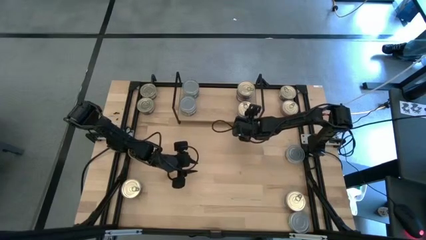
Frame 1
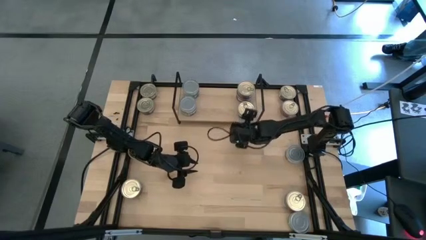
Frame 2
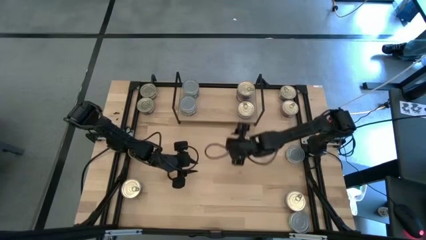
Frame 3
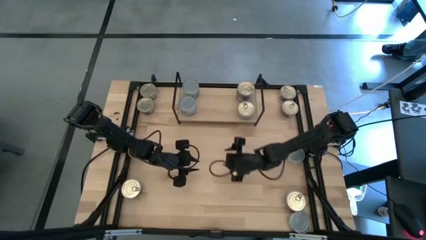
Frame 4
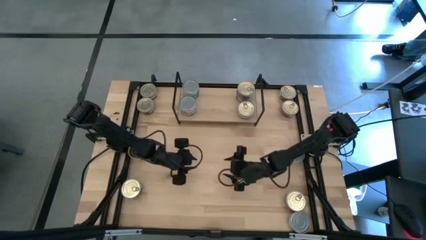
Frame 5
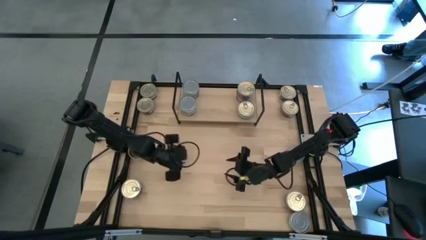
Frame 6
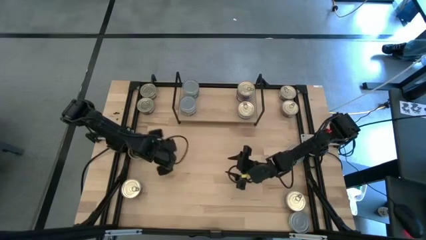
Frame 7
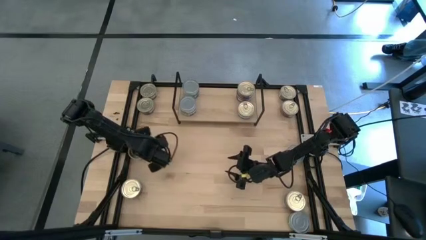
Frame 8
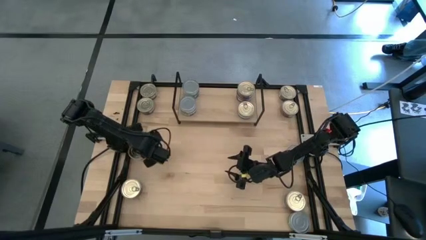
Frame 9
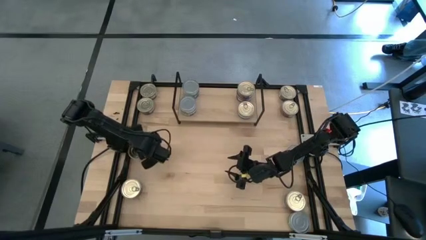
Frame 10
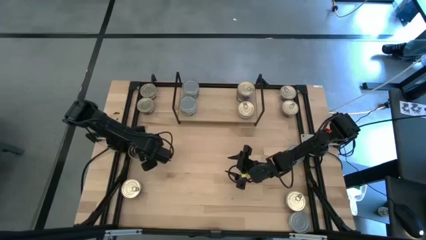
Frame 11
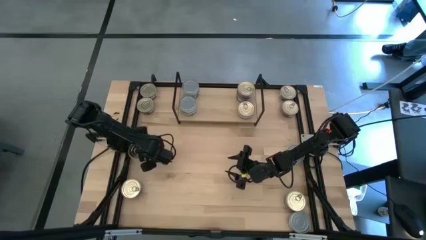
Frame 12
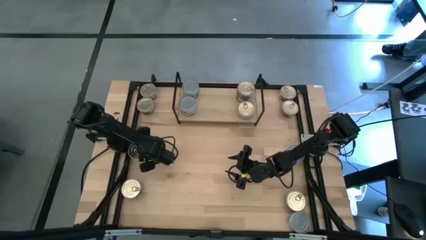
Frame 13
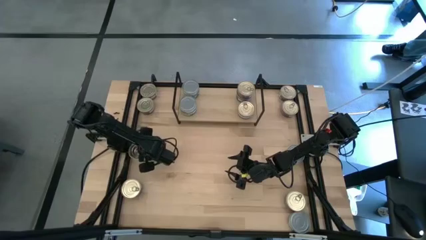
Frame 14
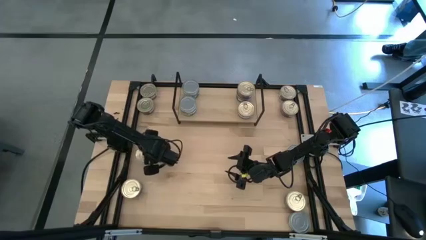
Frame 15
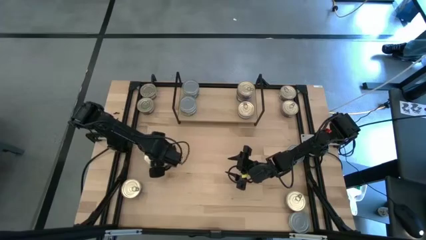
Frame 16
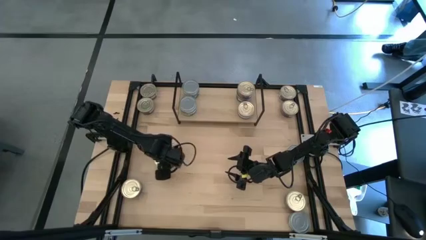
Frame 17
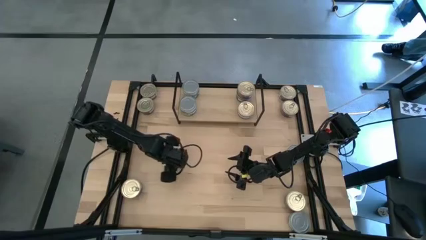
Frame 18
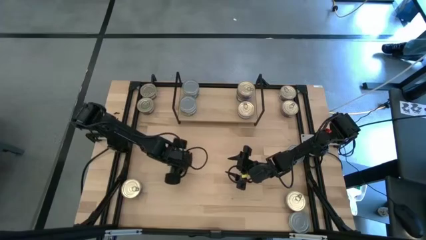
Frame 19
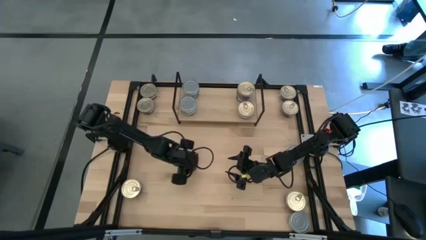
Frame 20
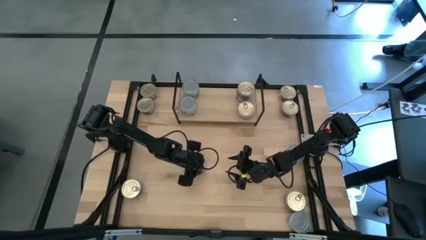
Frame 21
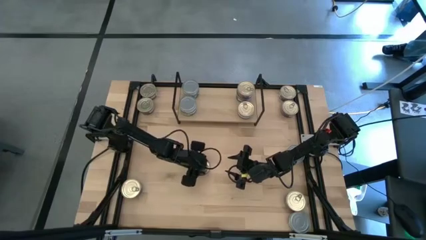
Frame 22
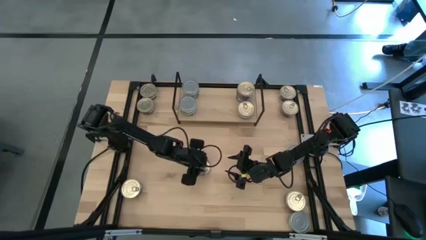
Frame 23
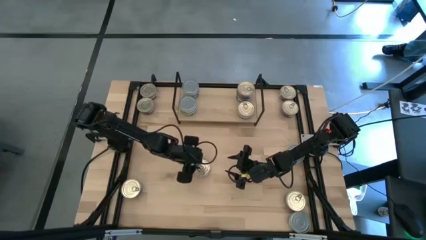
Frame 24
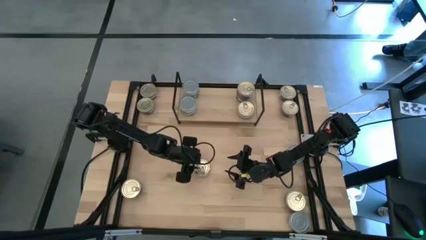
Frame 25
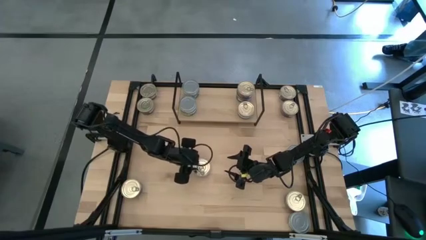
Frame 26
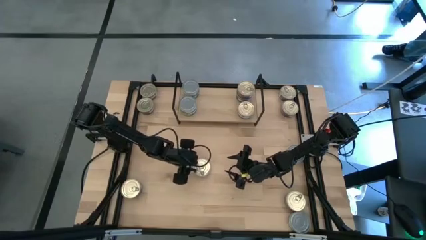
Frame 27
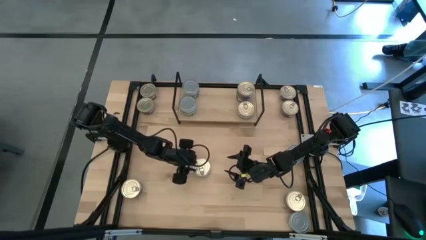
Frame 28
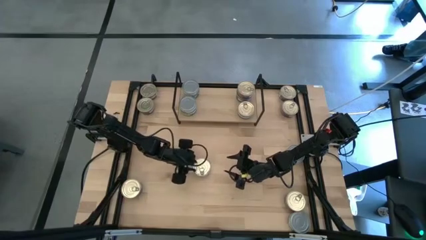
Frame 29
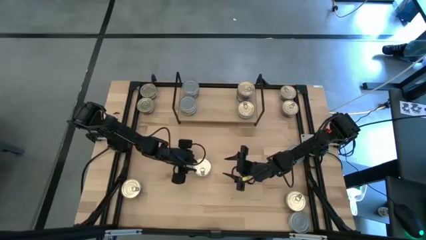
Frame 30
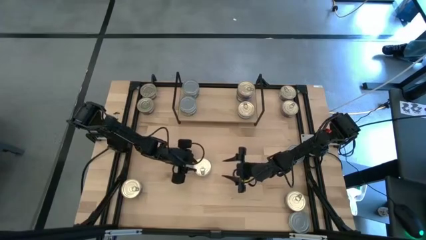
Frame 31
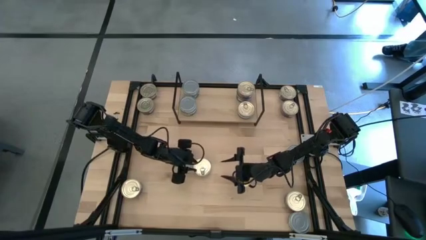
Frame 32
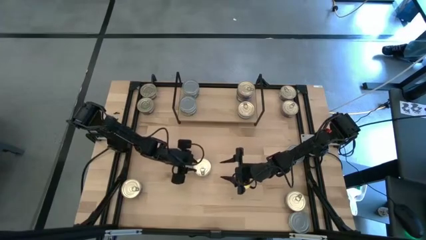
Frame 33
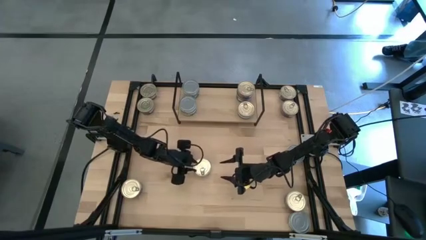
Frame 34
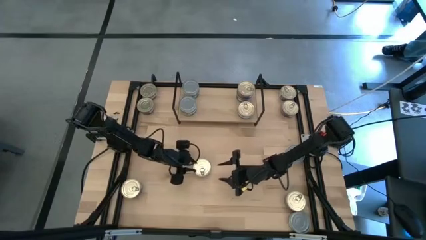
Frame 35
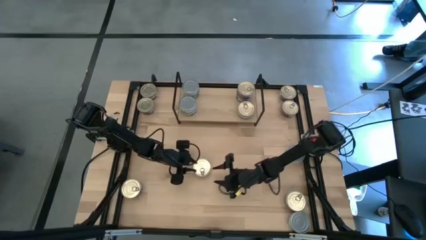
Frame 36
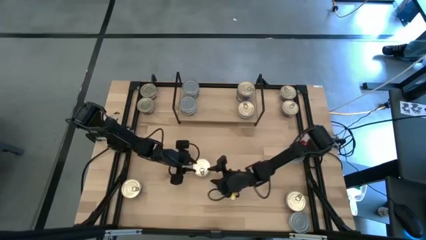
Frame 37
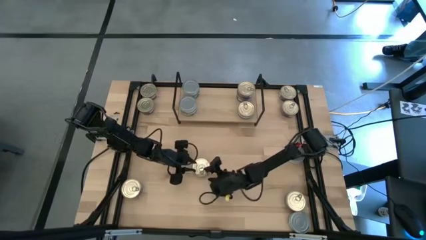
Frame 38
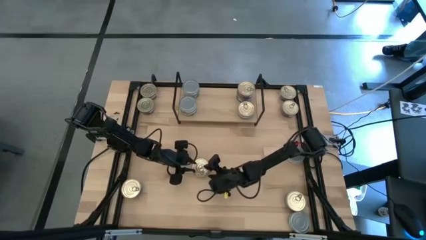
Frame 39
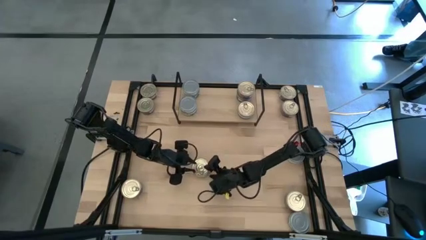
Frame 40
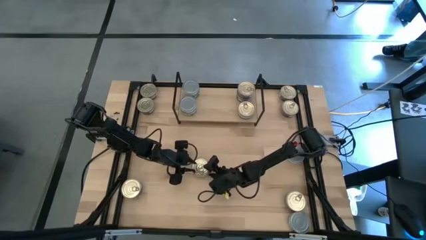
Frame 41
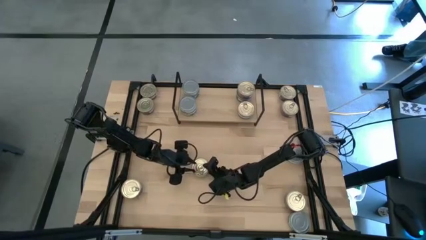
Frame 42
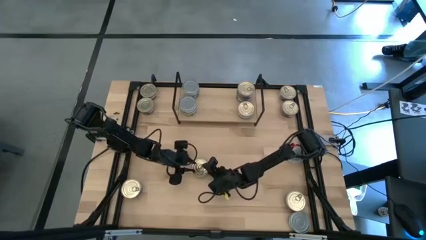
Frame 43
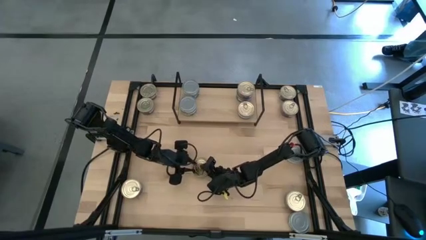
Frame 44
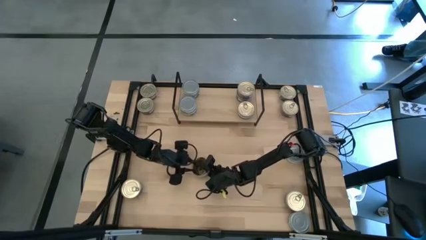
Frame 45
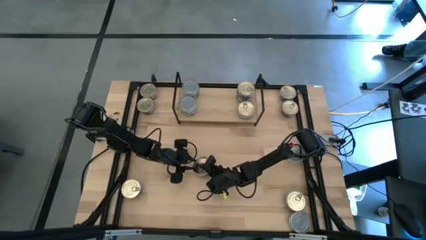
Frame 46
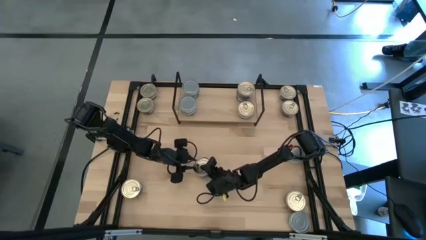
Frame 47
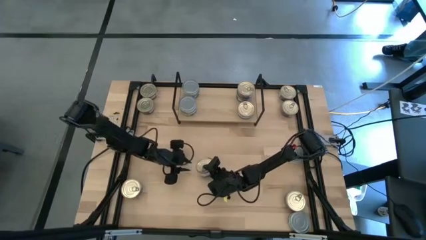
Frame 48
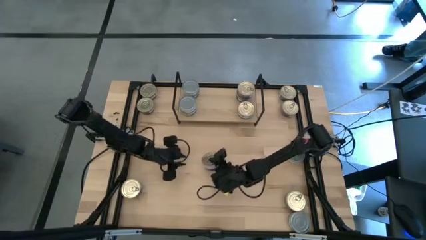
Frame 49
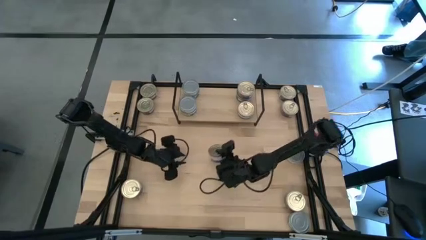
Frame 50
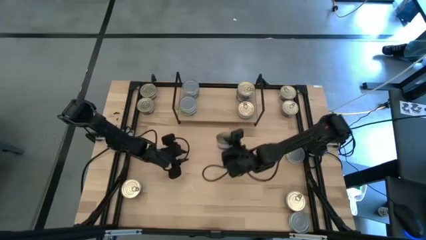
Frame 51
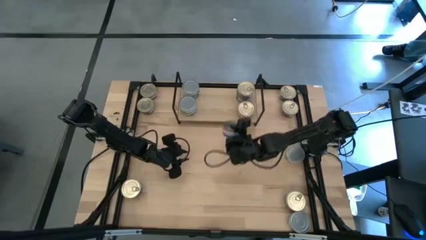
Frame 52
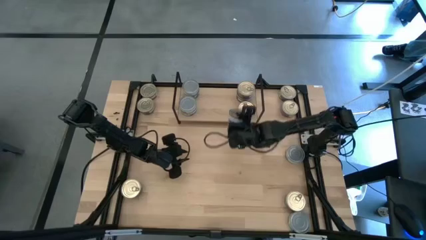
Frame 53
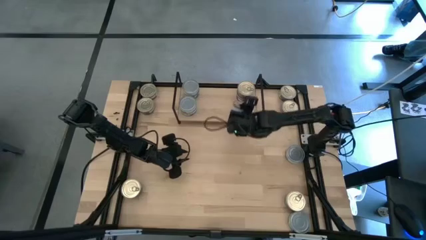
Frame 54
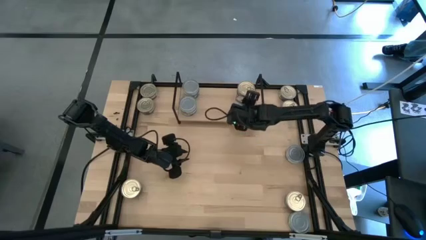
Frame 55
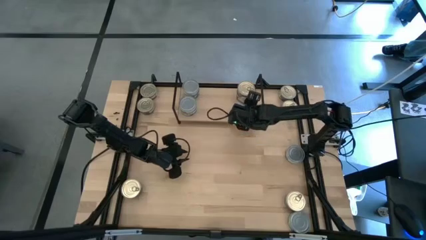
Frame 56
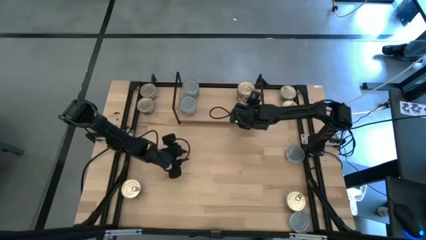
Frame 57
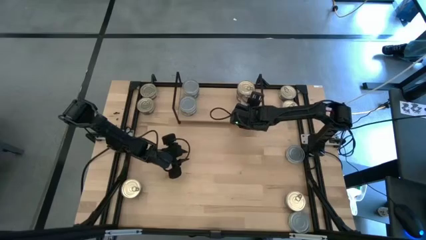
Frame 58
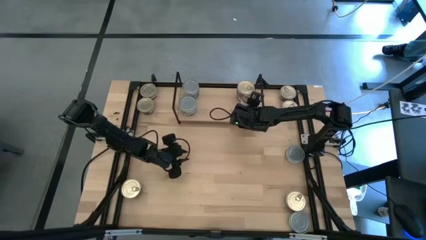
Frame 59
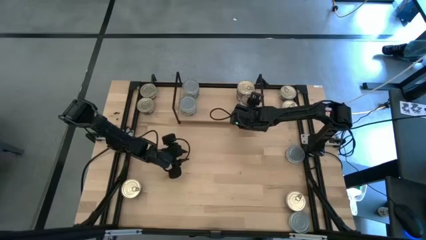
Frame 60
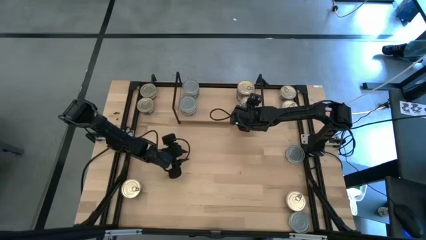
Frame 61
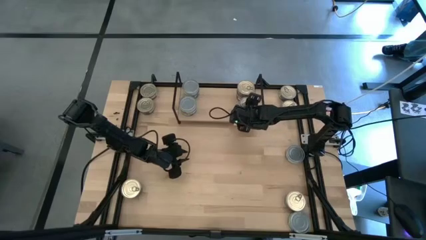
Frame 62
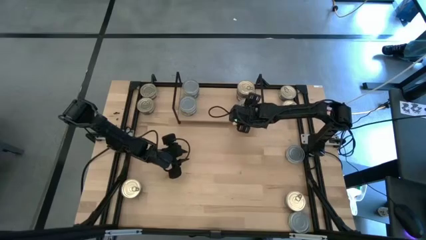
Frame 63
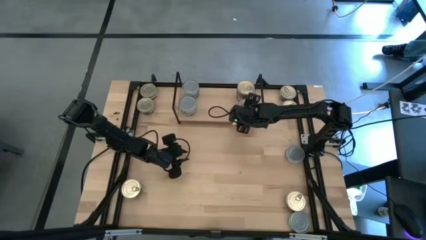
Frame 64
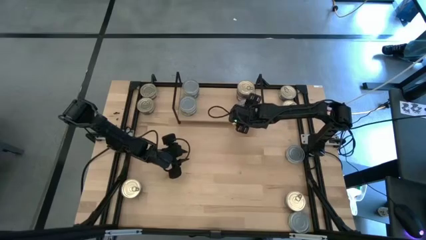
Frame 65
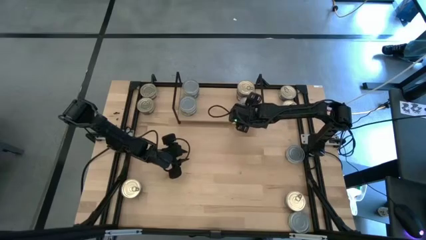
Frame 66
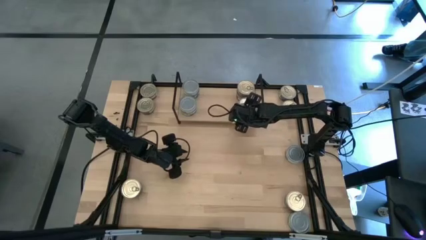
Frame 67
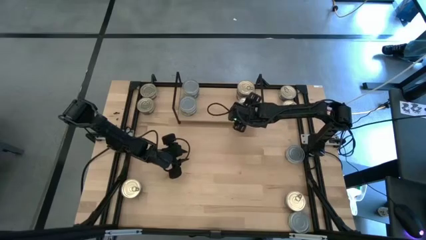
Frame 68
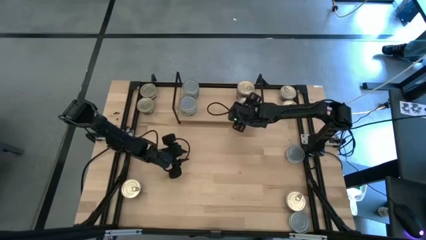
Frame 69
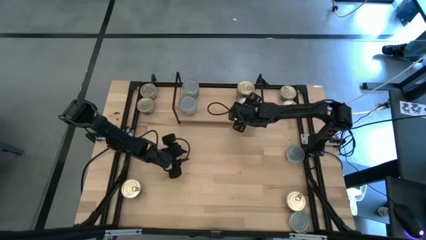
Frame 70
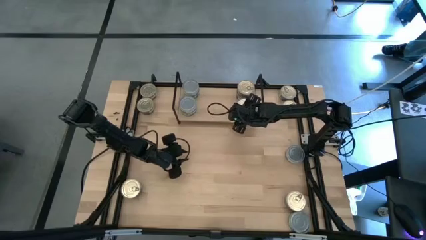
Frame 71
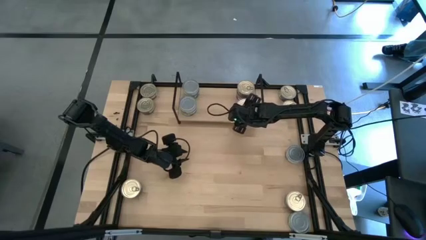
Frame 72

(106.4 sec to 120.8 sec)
Task: Stack canned seafood by type on shelf
Stack the blue pink tuna can on top of the other blue pink tuna can on the shelf

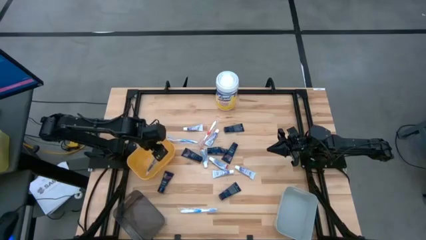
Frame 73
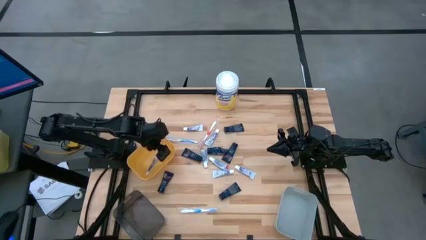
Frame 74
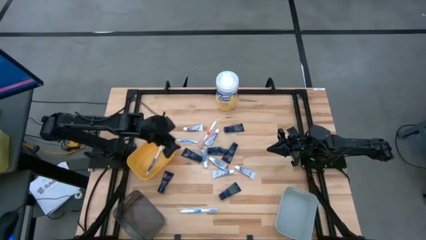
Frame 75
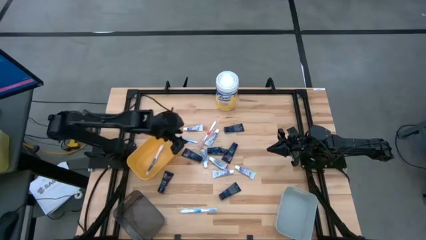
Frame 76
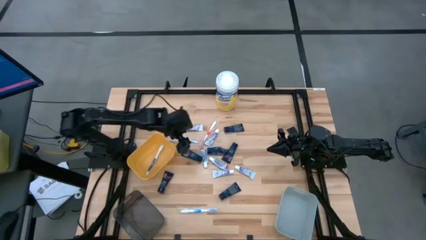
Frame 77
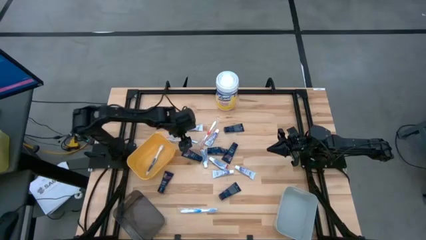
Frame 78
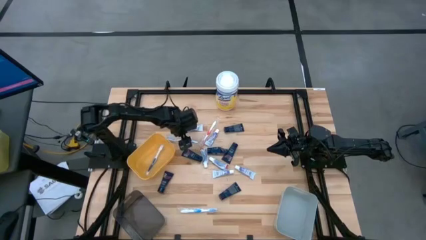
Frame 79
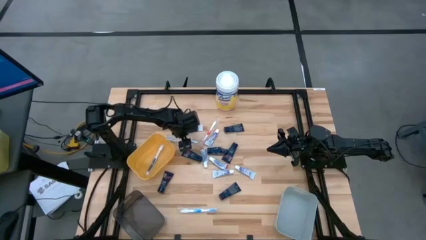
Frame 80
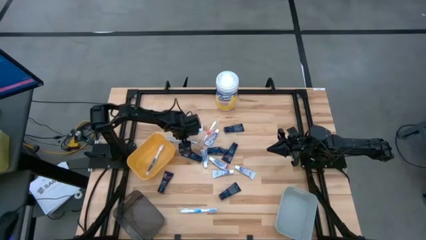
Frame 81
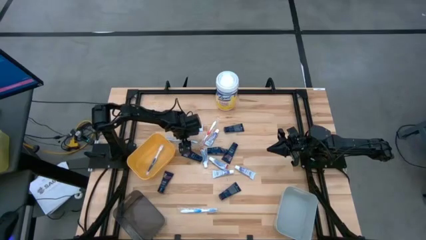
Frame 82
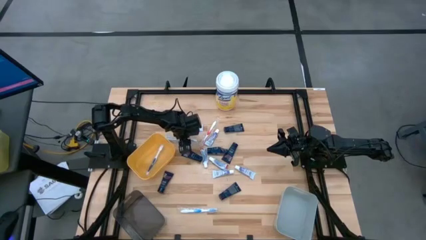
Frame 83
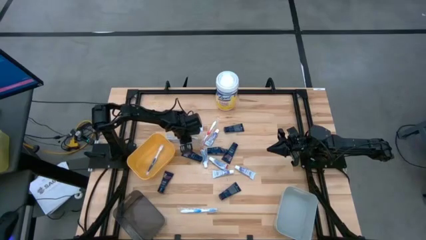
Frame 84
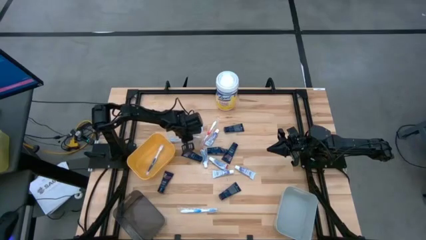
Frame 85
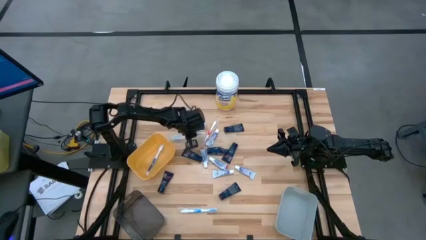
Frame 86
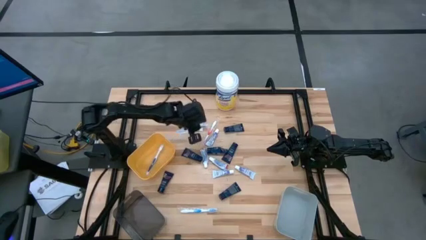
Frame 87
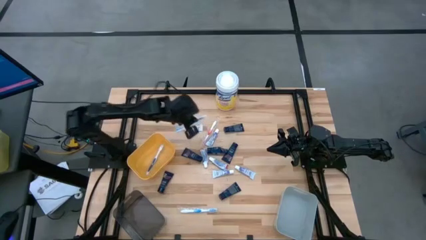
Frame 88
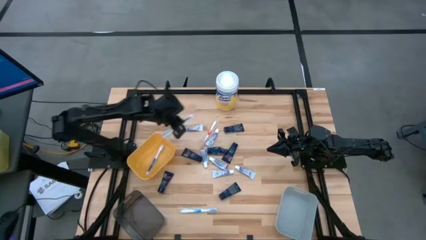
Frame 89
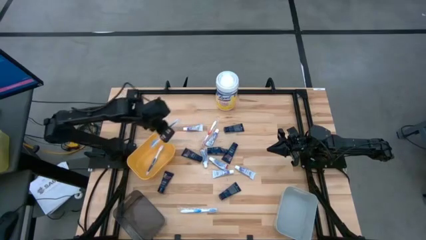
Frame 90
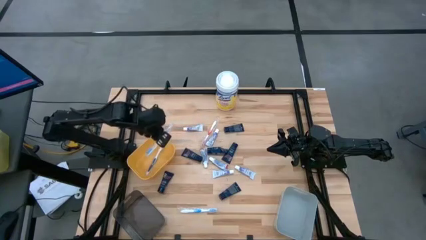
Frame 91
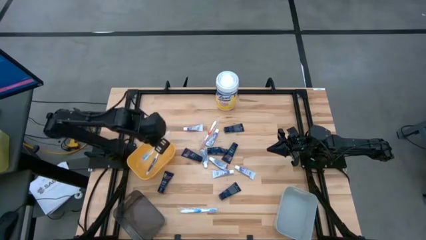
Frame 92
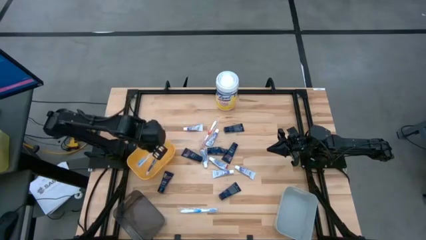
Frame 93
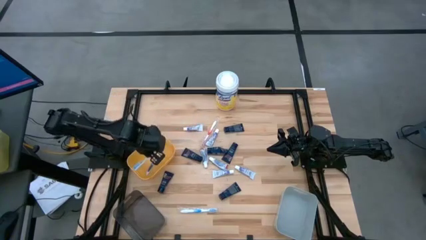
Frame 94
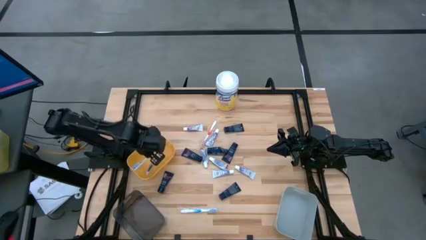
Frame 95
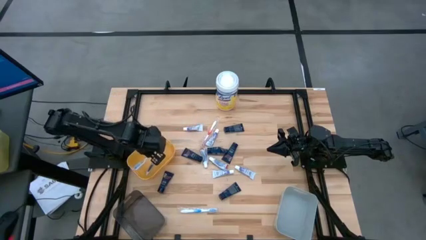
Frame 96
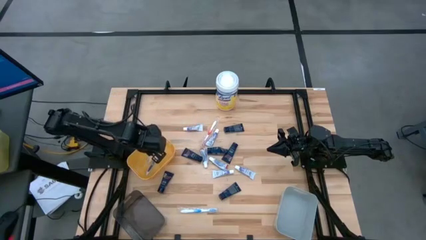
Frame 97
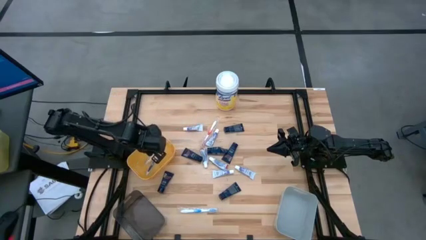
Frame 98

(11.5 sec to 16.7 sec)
Task: Pick & Place Travel size toiletries
Put the top blue toothbrush into the yellow bin
